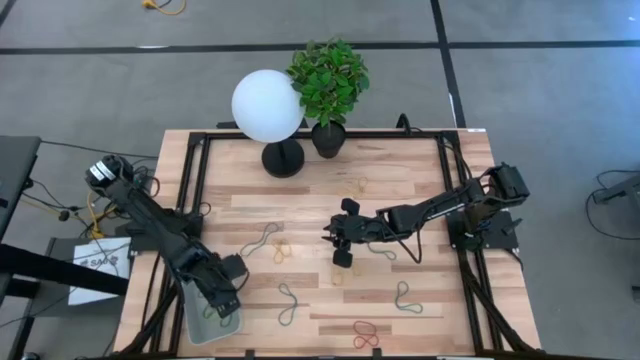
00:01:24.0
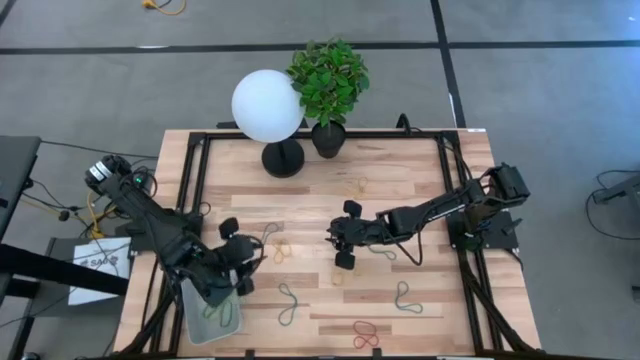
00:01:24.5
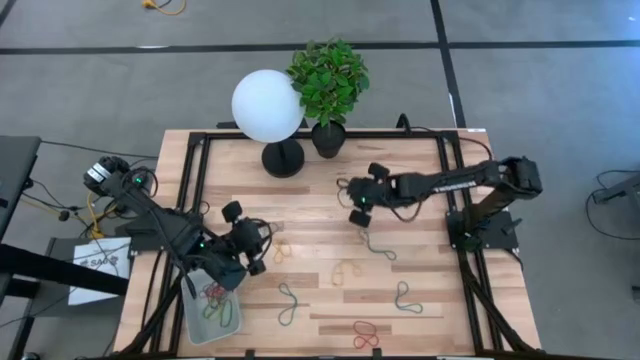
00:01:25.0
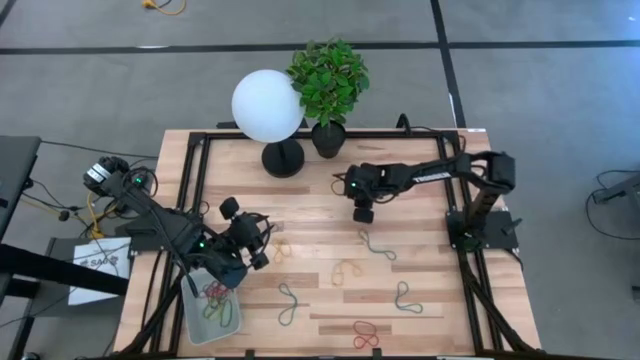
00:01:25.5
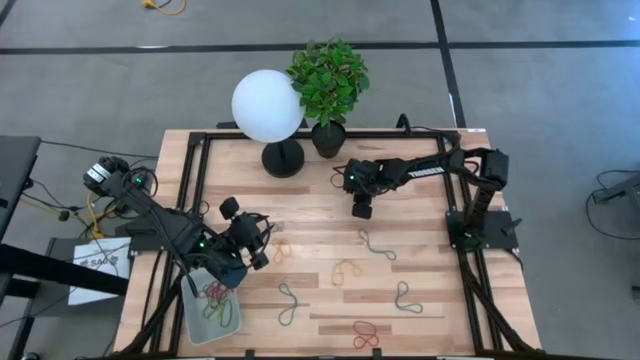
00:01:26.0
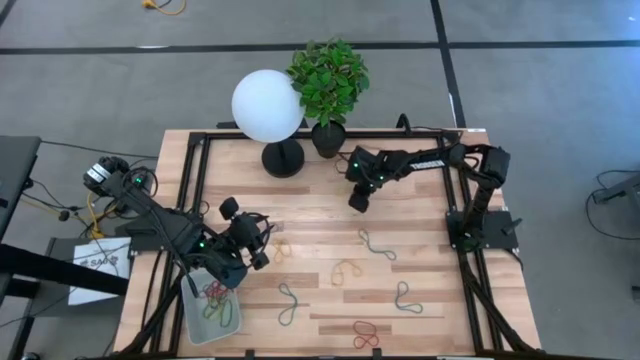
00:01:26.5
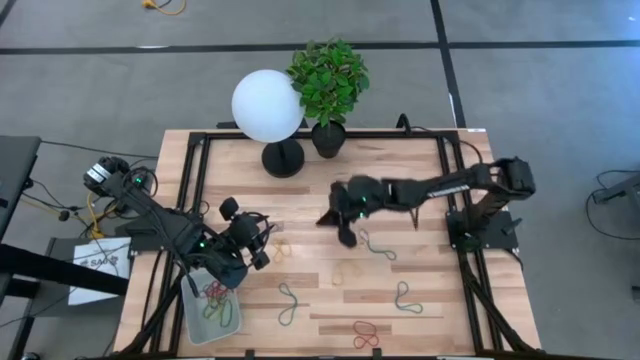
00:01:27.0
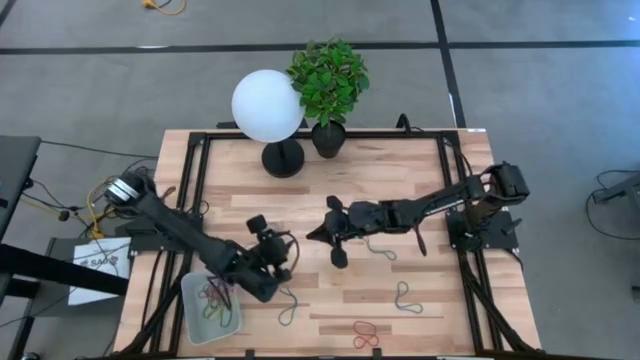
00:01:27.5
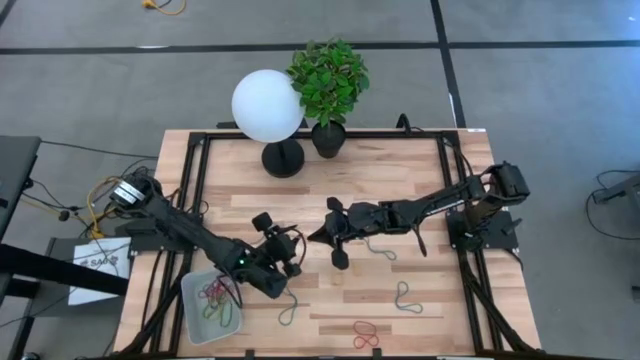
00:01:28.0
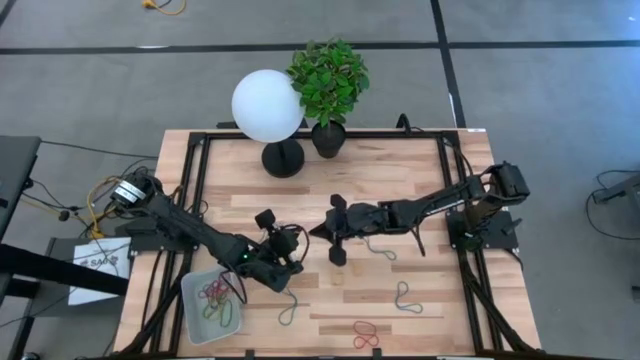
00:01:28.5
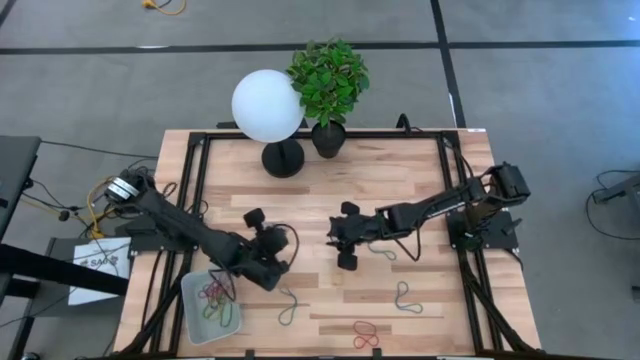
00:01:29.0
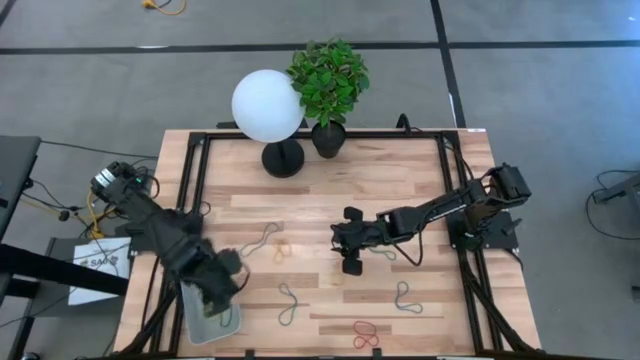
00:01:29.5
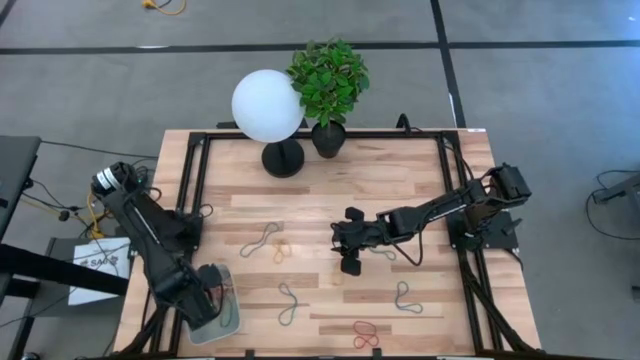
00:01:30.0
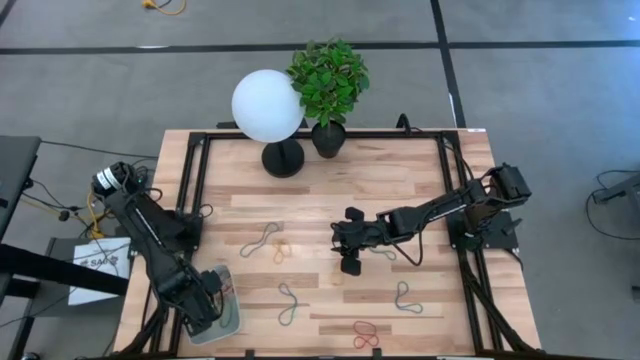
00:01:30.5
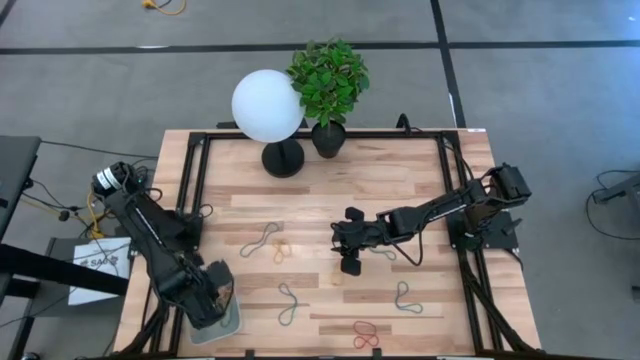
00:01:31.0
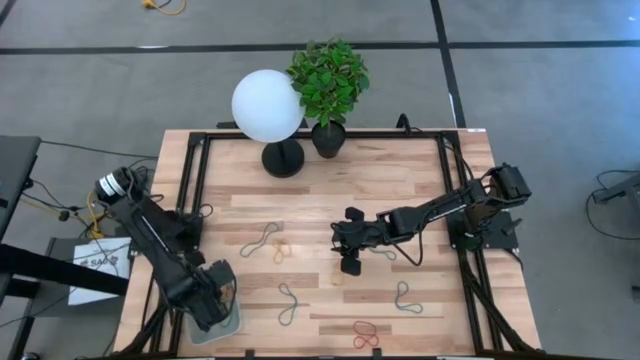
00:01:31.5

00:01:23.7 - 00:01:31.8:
Task: Pick and place items into bin
Put the yellow rubber band into the gray bin

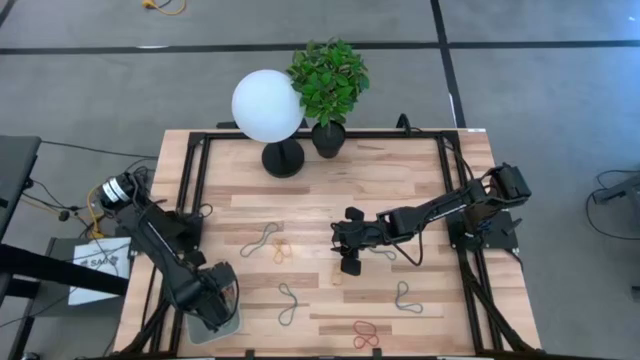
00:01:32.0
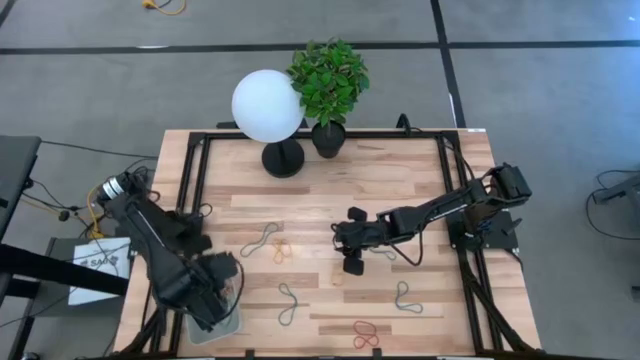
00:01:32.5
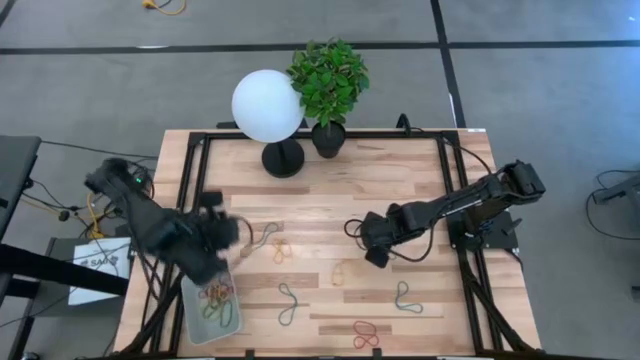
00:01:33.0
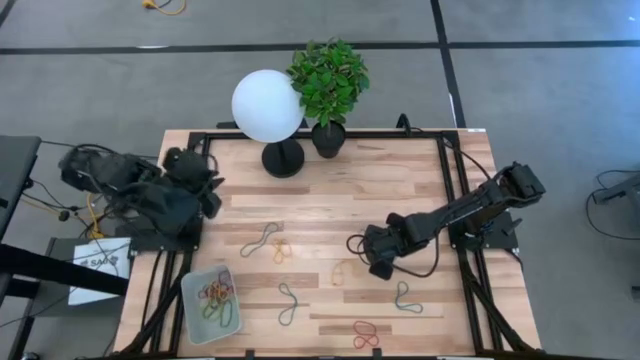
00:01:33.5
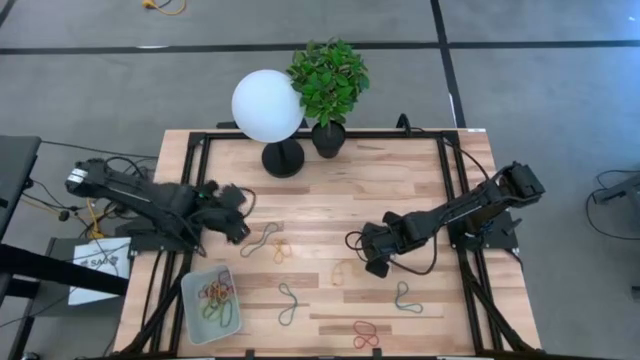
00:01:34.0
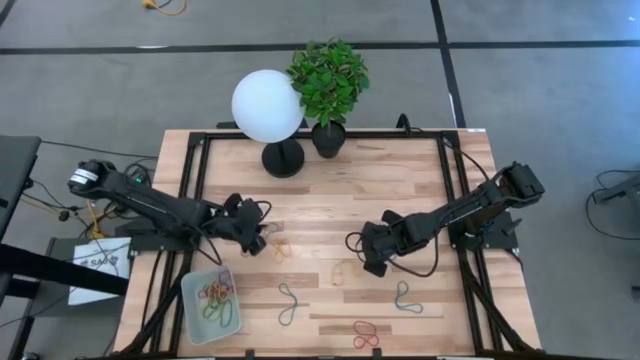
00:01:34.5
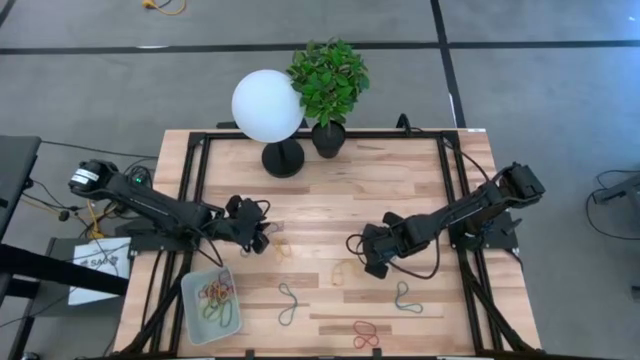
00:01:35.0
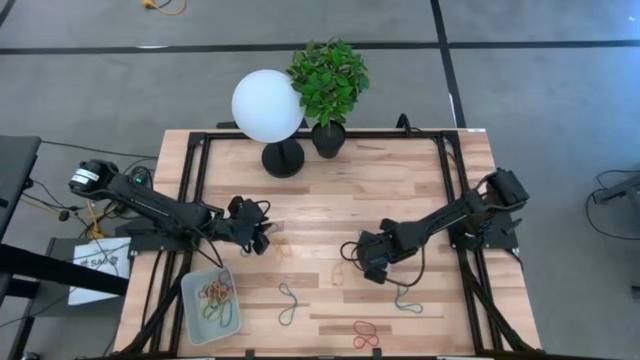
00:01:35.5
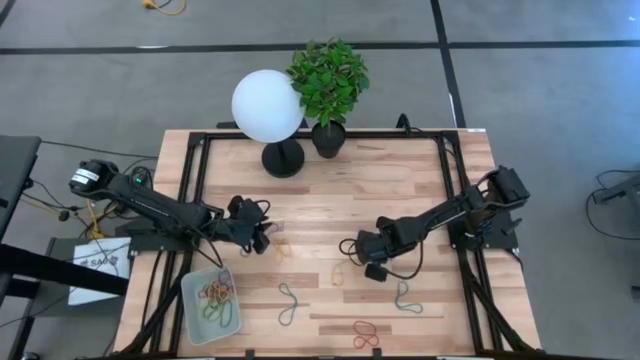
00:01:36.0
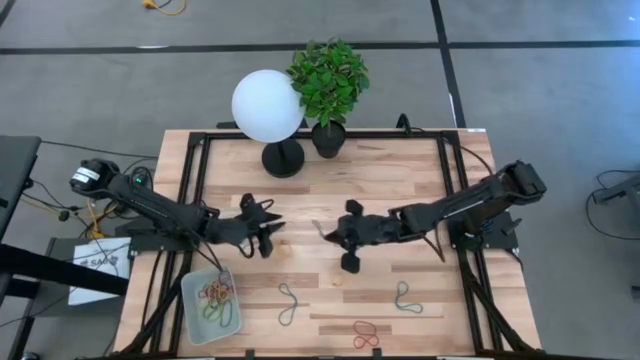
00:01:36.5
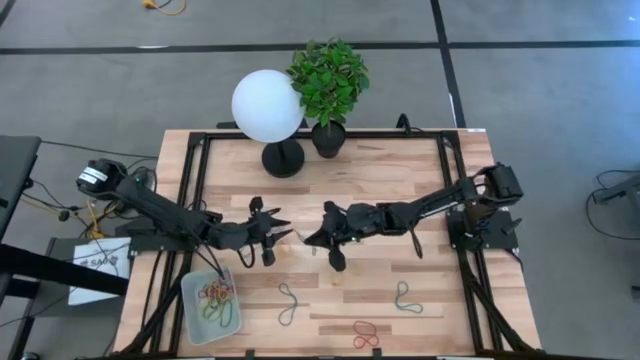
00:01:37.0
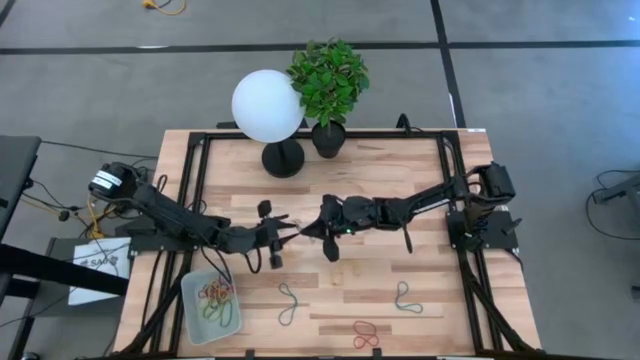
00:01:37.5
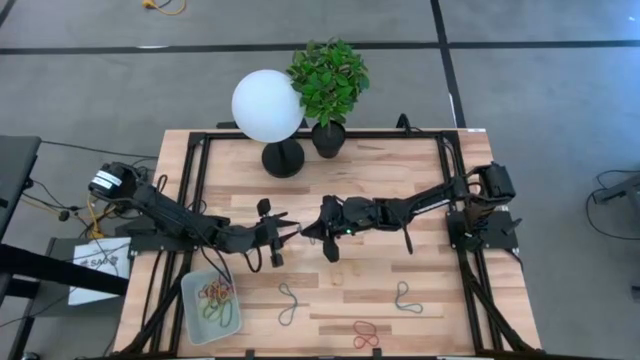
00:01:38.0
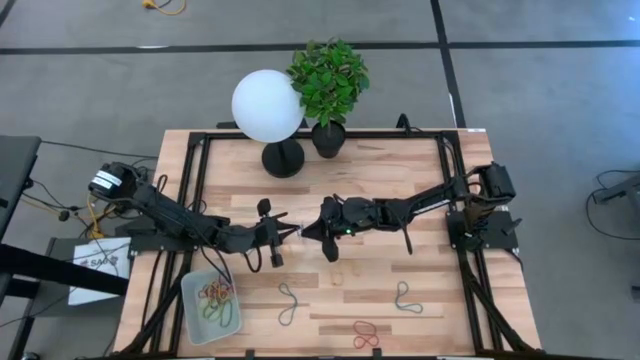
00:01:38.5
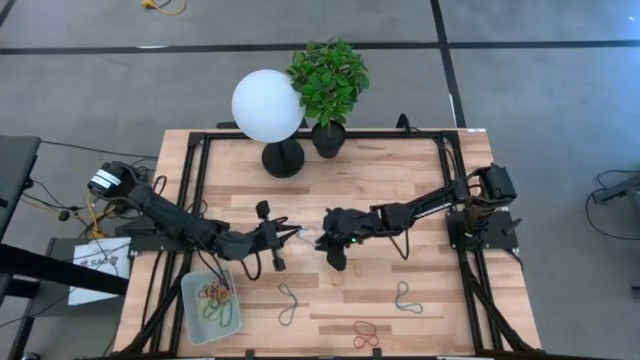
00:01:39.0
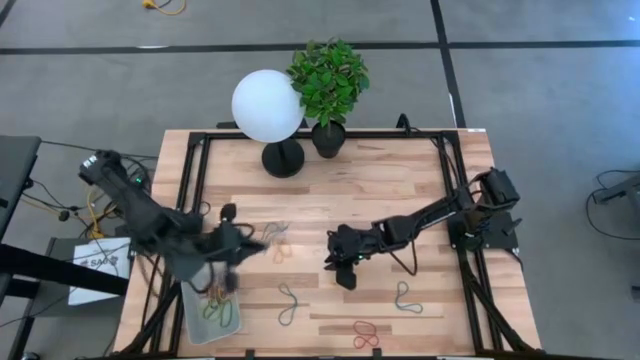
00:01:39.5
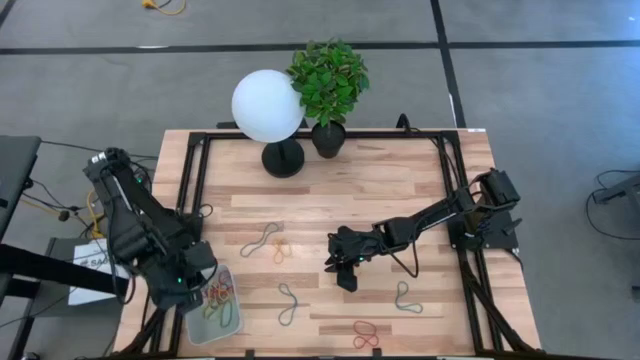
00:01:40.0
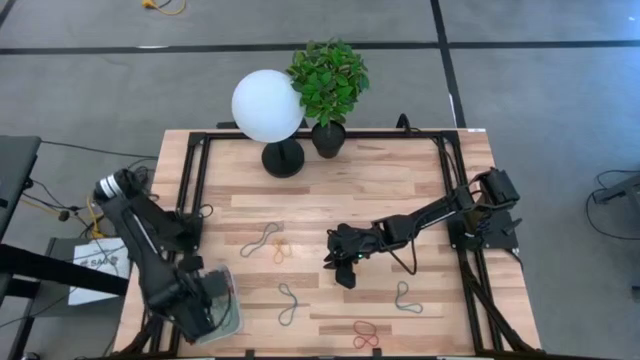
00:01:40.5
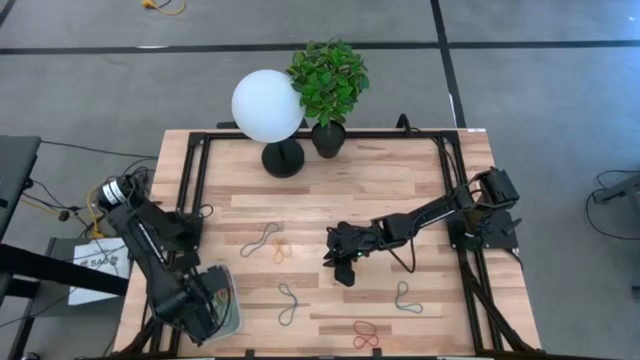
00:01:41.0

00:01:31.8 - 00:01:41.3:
Put the blue rubber band into the gray bin

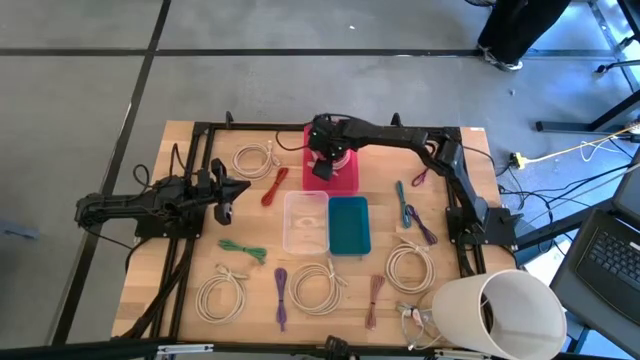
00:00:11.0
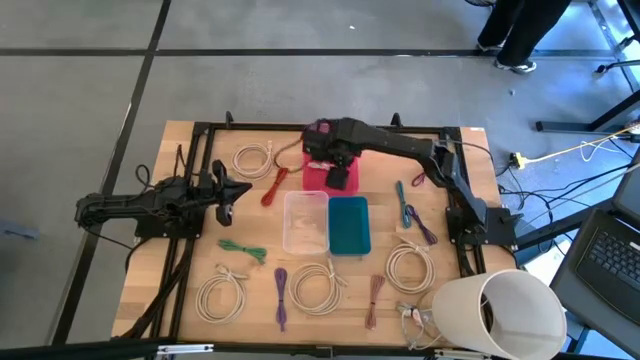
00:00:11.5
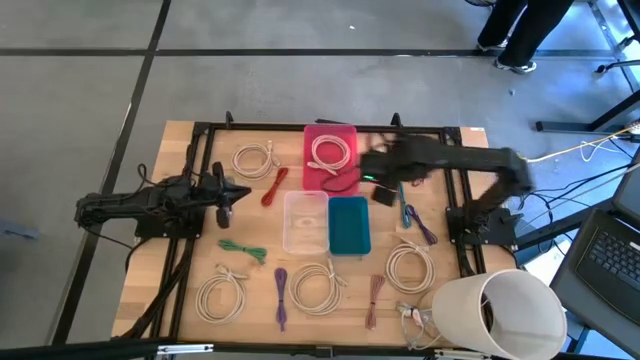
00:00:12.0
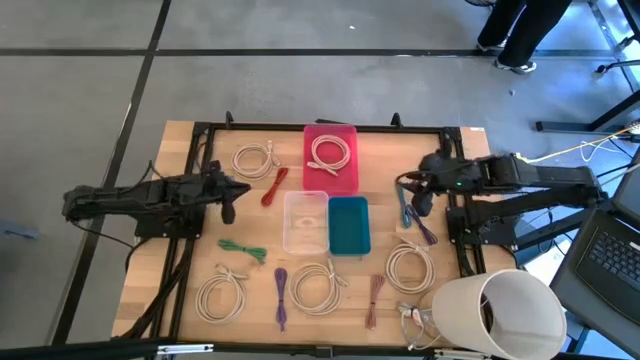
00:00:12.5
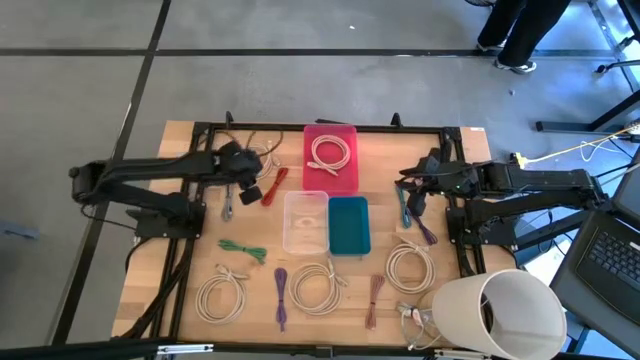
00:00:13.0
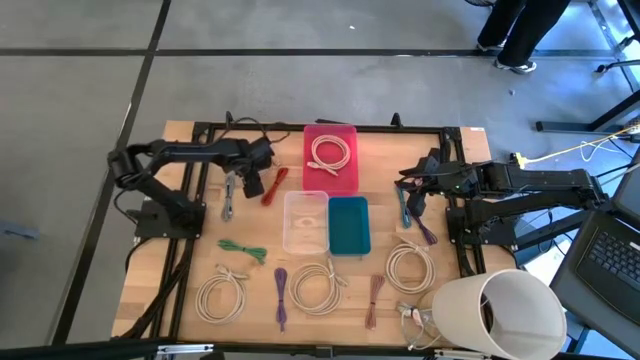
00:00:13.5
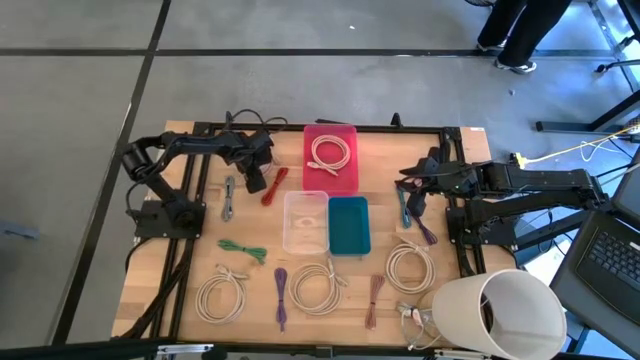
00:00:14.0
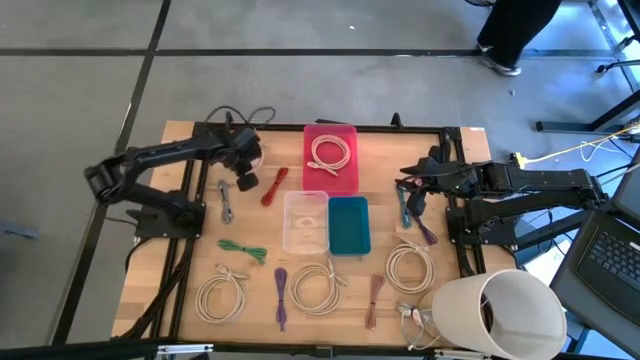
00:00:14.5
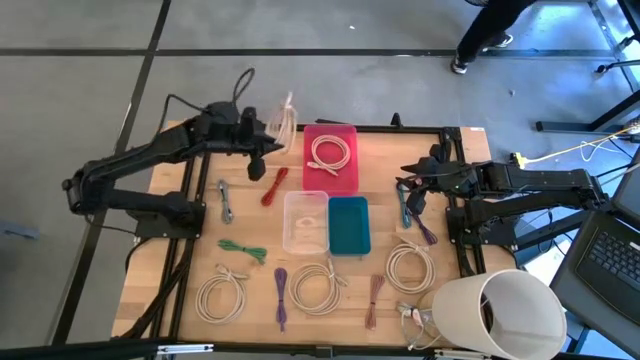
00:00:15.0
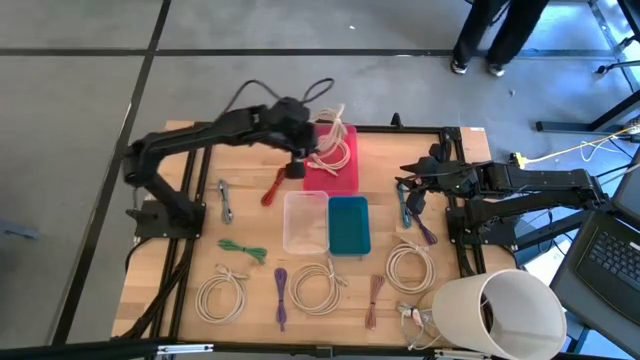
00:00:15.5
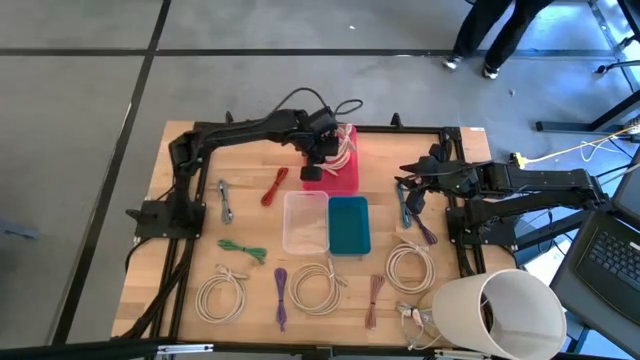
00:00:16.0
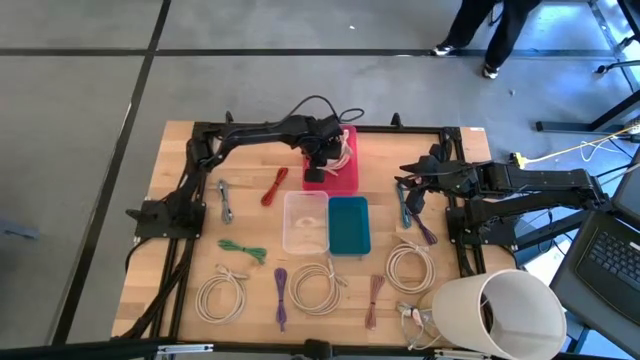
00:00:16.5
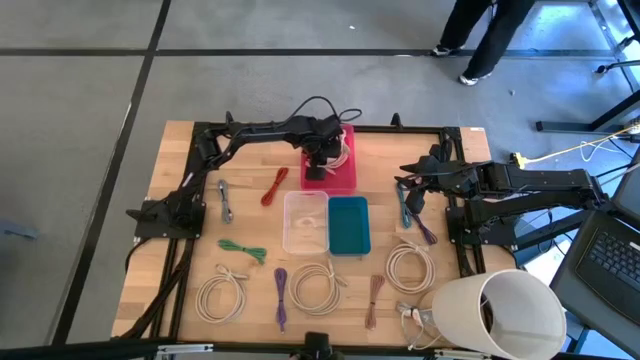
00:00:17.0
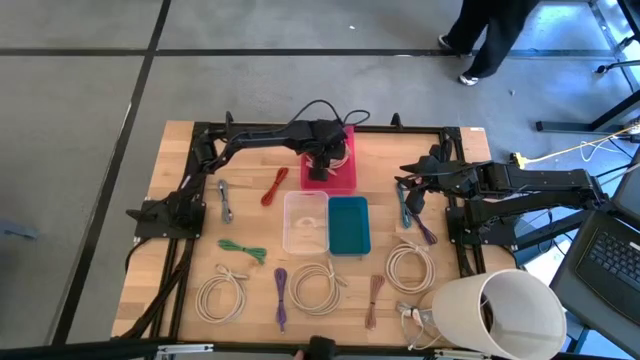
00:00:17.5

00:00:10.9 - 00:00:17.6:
Task: Pick & Place USB Port
Put the brown HDMI cable into the pink bin
